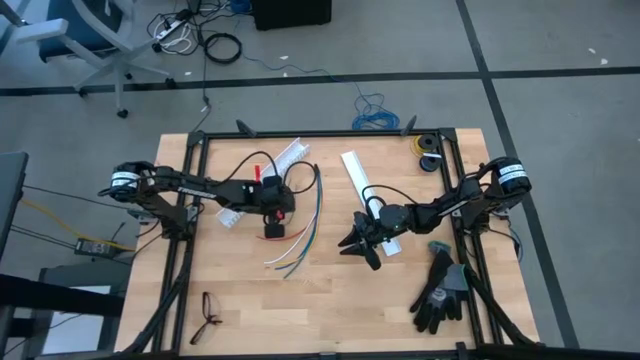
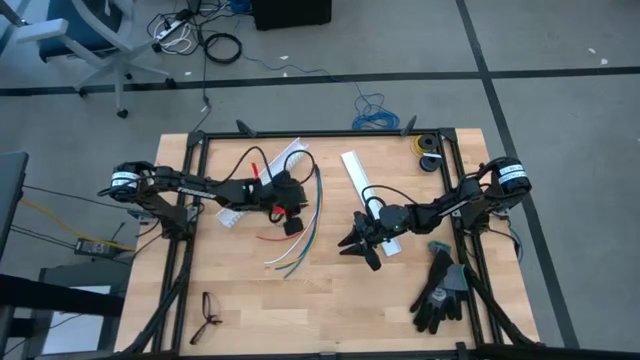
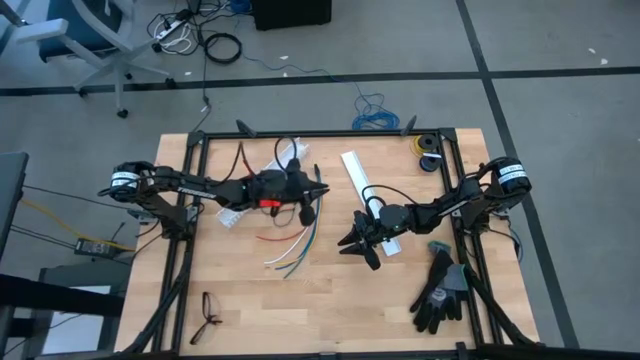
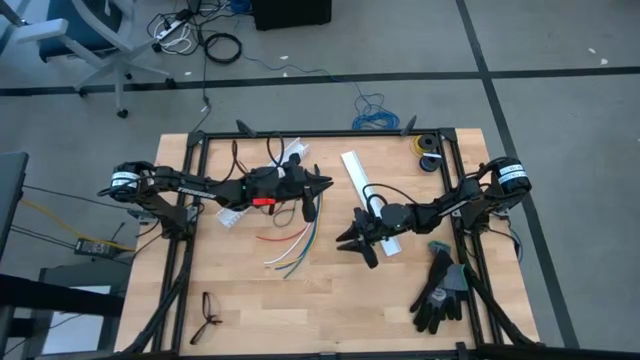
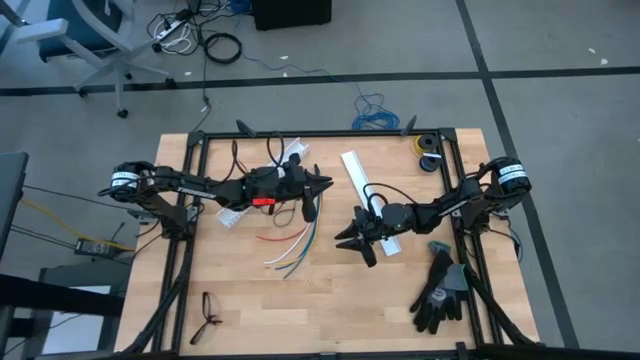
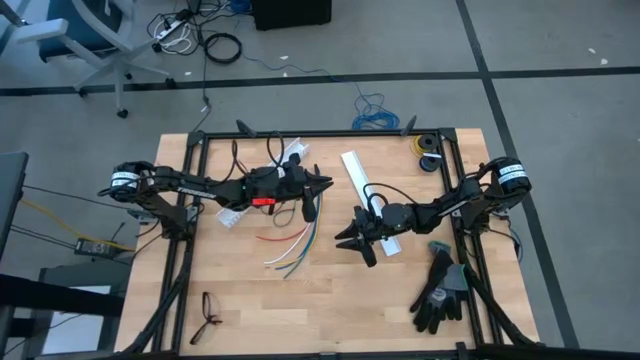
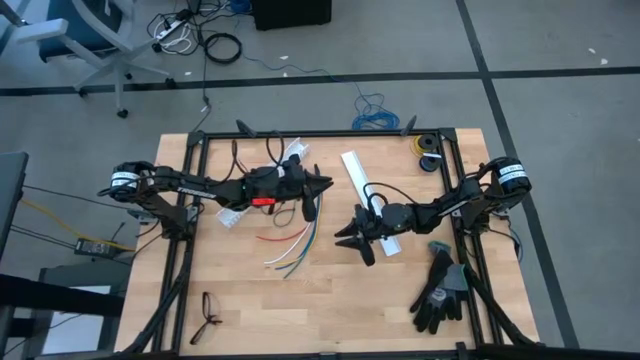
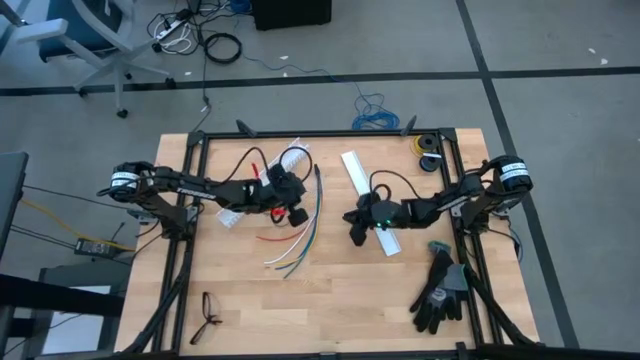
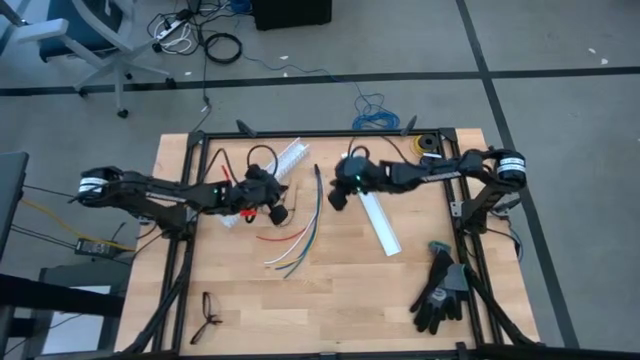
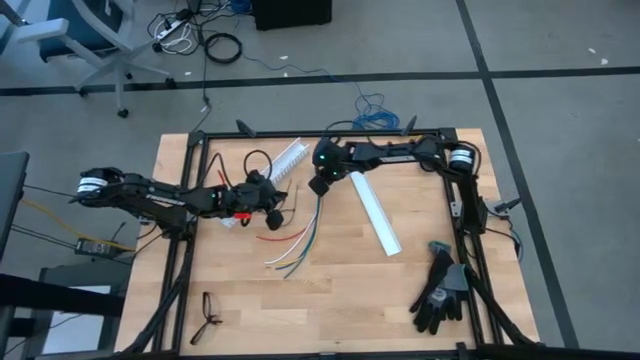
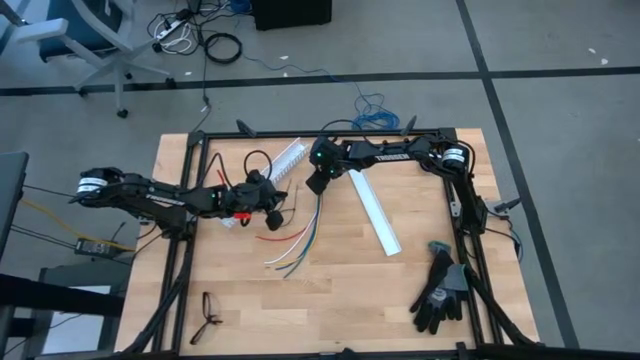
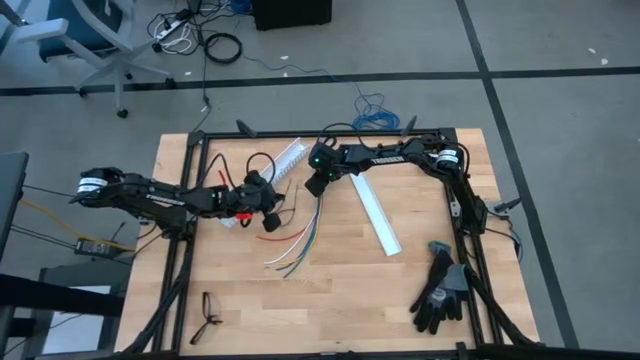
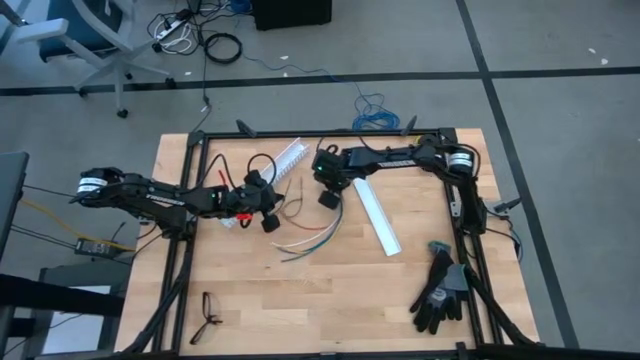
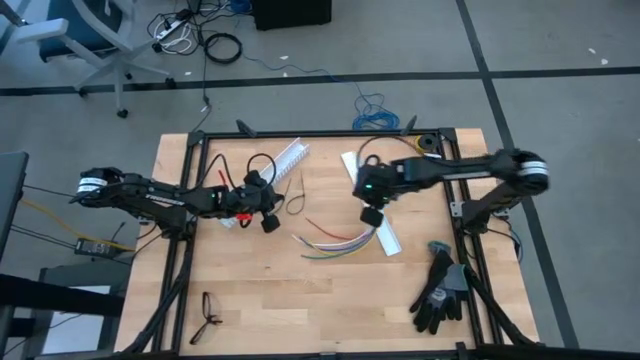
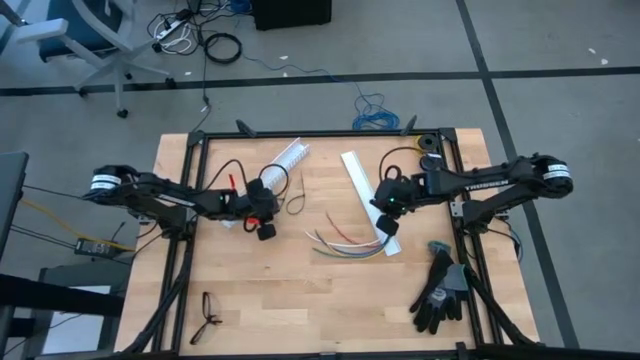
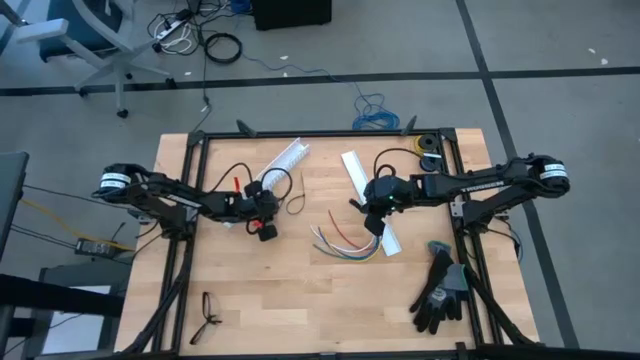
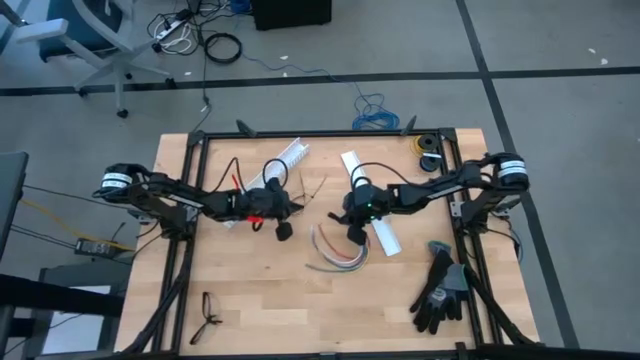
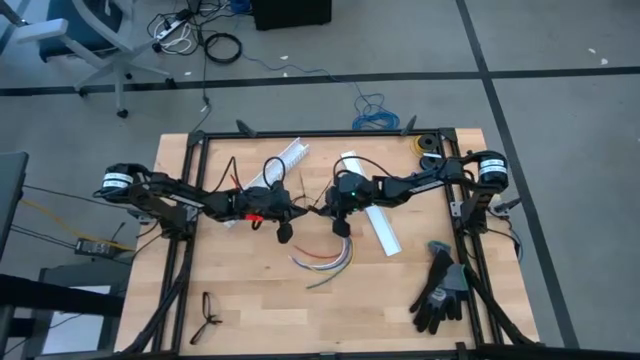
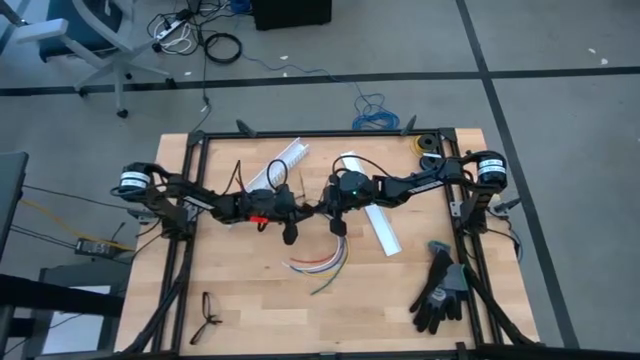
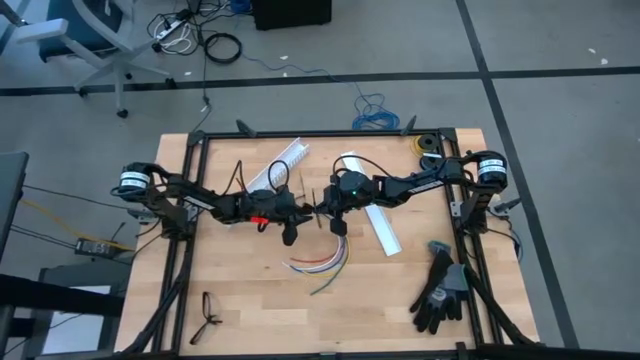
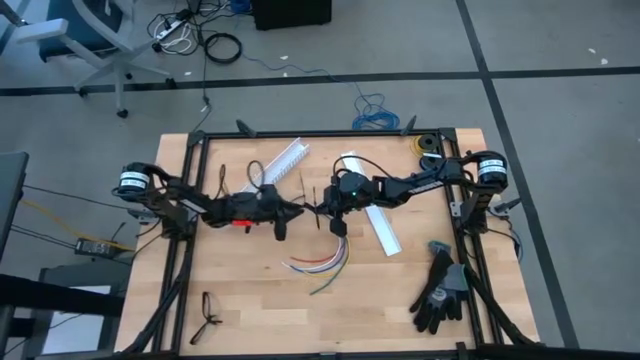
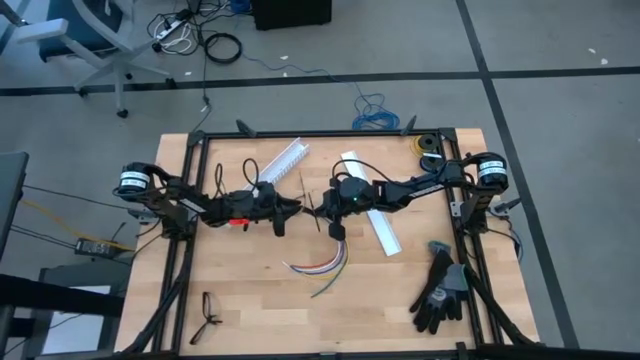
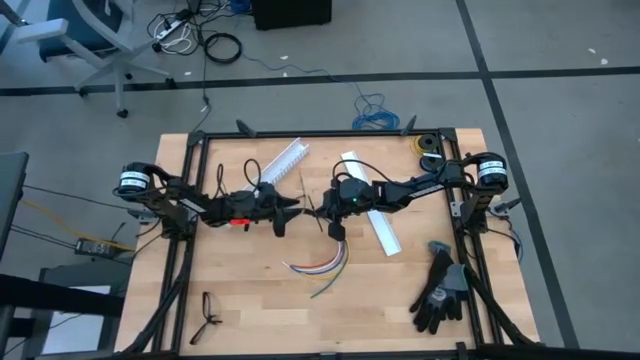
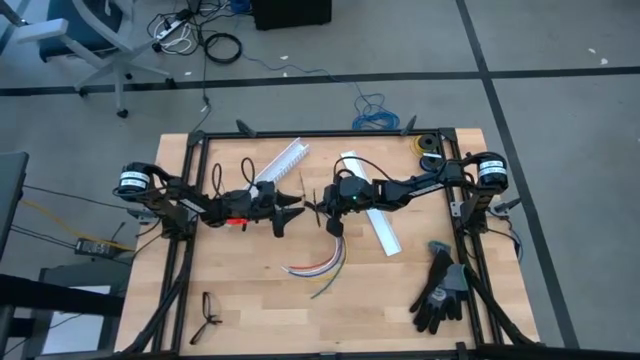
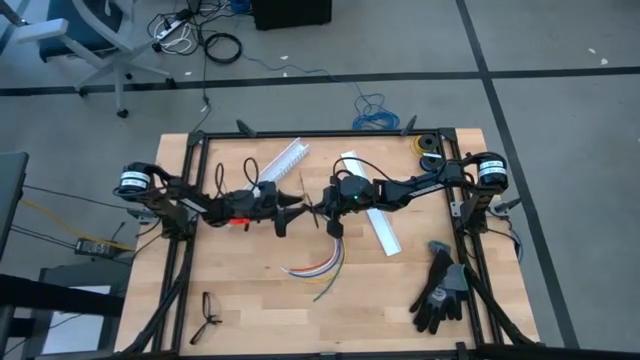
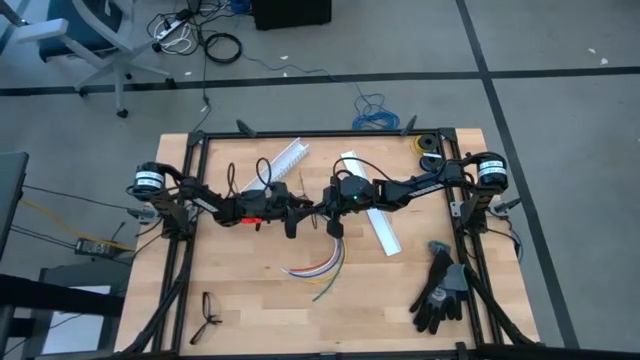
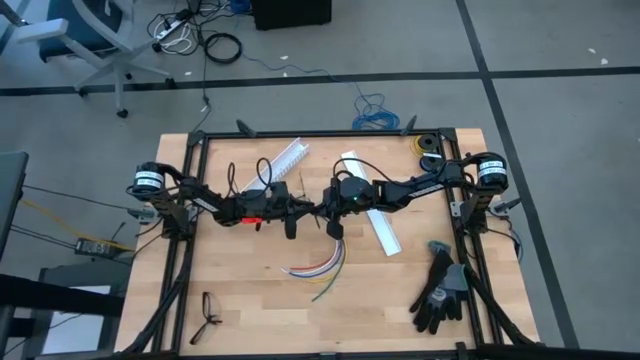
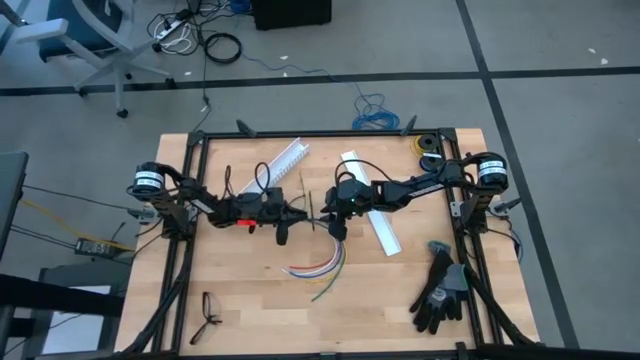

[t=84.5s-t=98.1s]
Task: Ziptie cables
Wrap the cable wires with the left black zip tie

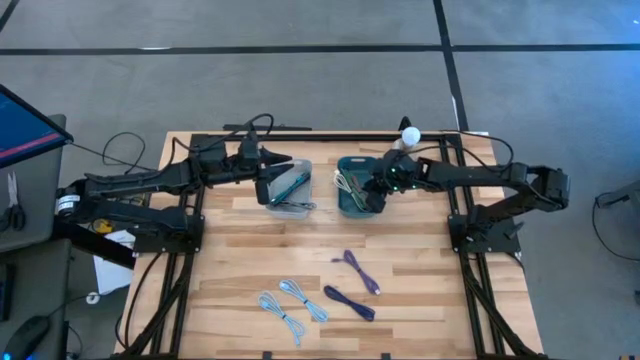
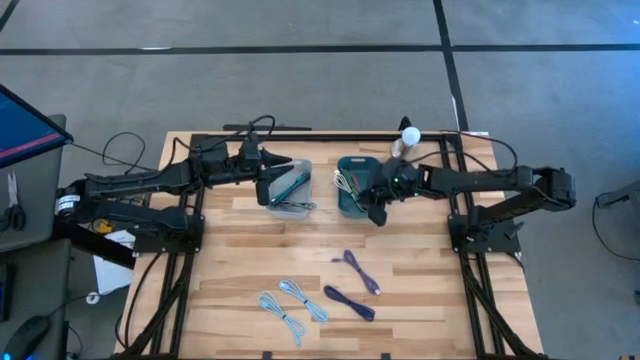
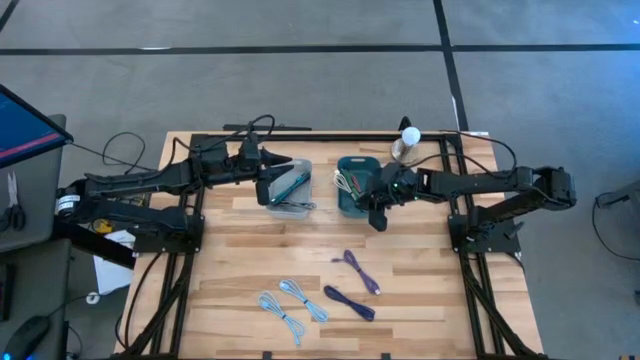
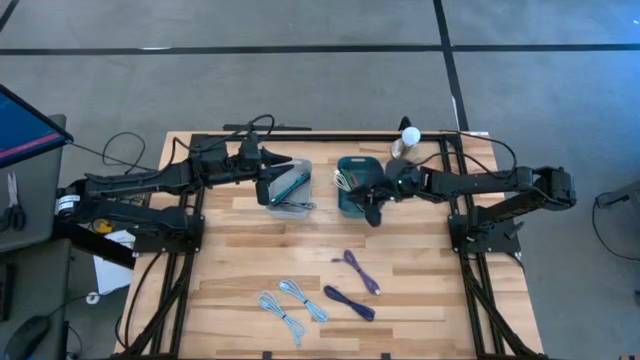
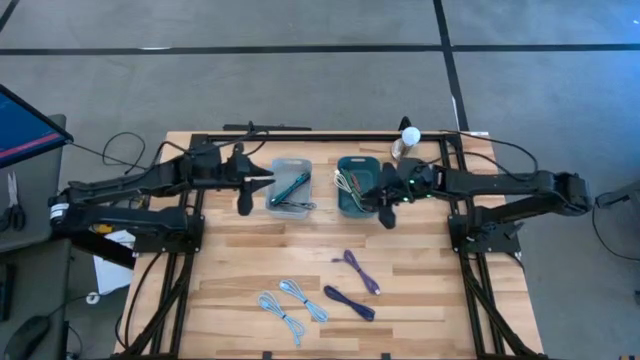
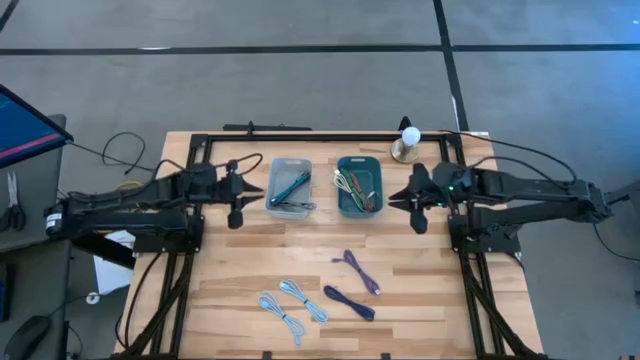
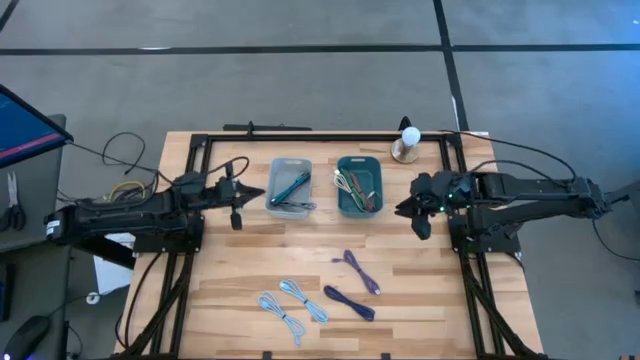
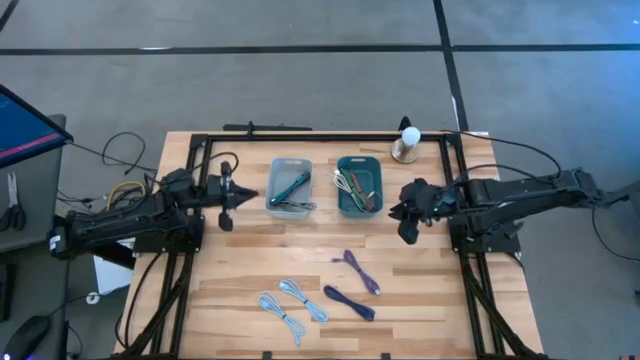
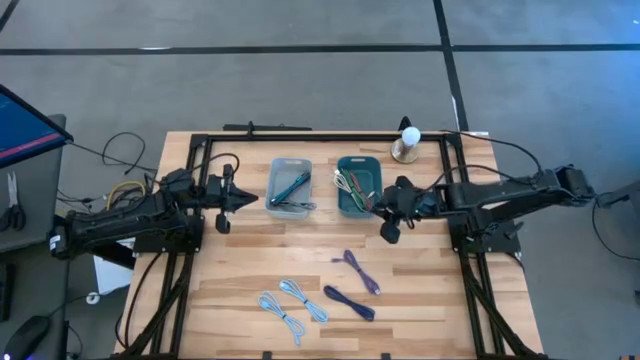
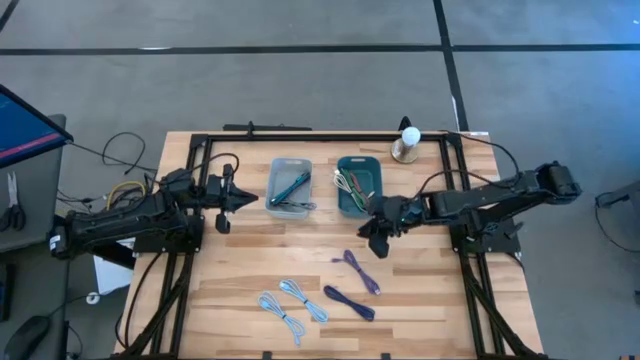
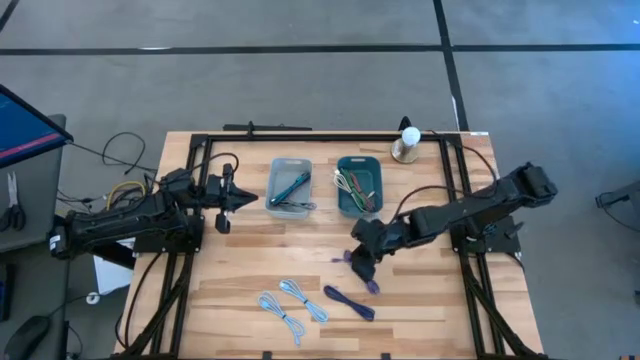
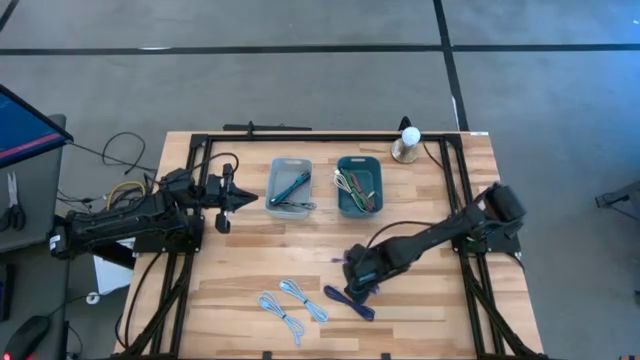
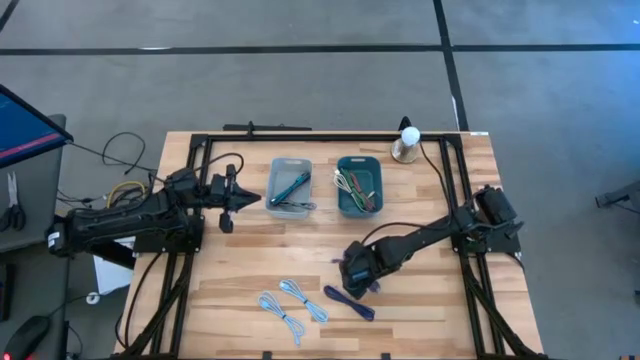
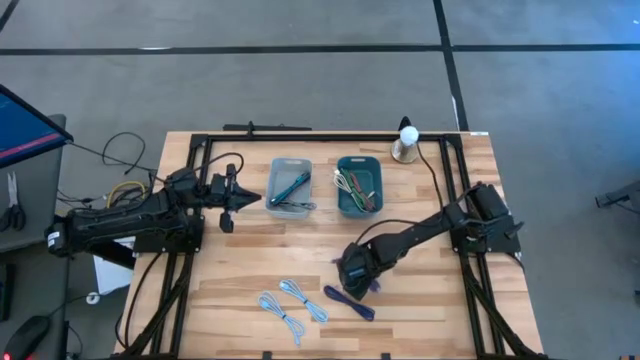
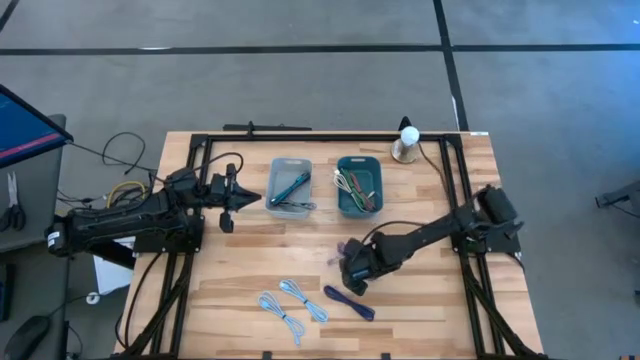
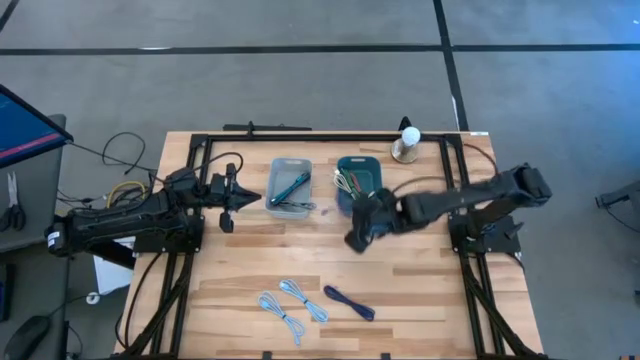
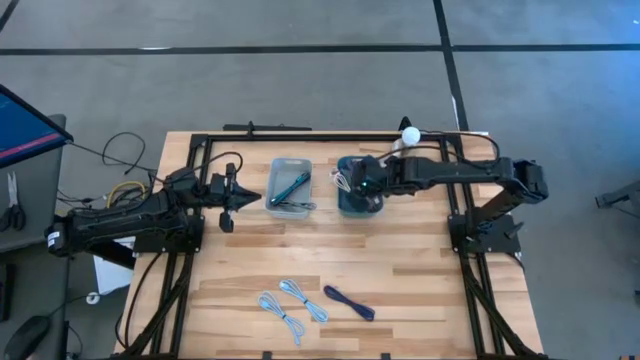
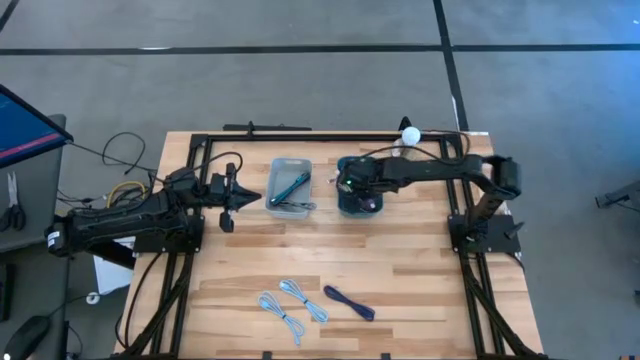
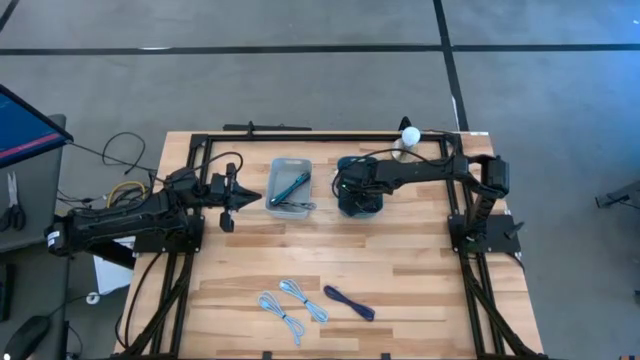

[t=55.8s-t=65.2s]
Task: Pick & Place USB Port
Put the purple charger cable into the blue bin
